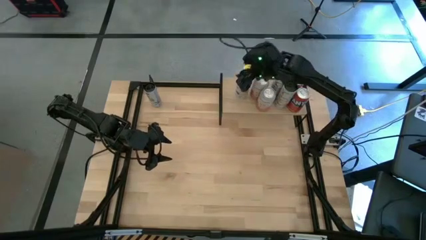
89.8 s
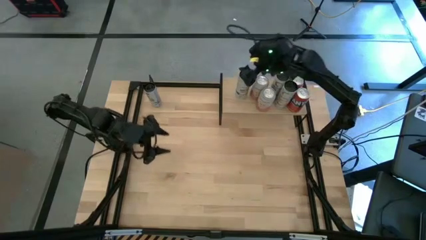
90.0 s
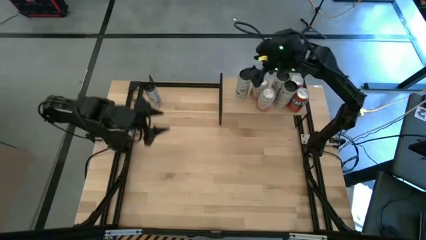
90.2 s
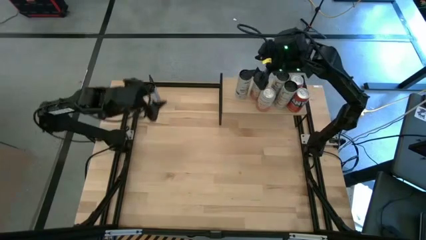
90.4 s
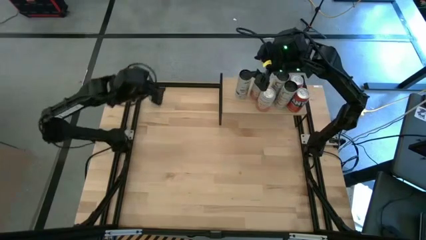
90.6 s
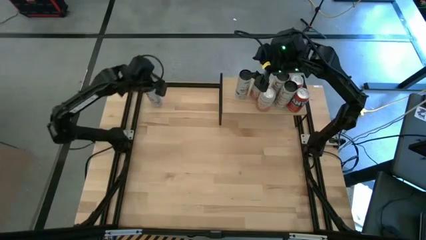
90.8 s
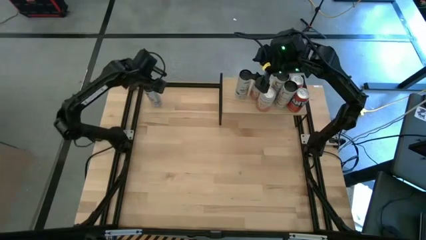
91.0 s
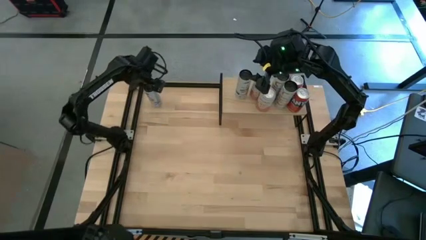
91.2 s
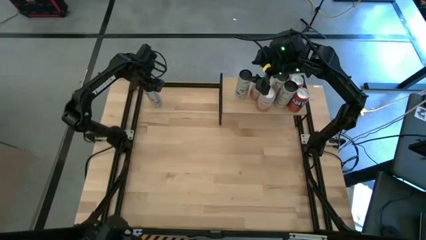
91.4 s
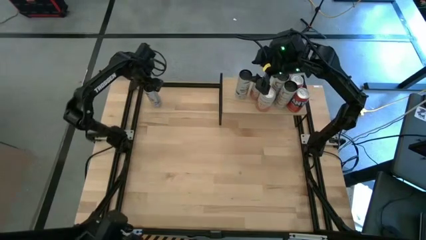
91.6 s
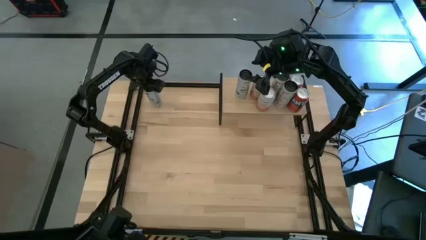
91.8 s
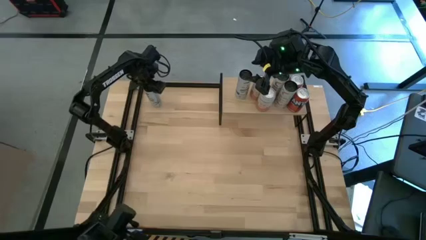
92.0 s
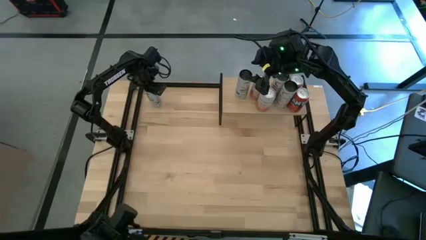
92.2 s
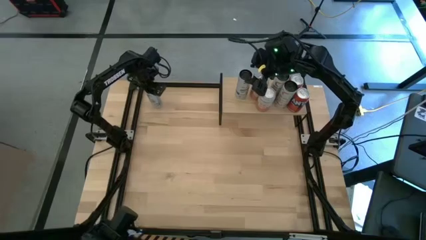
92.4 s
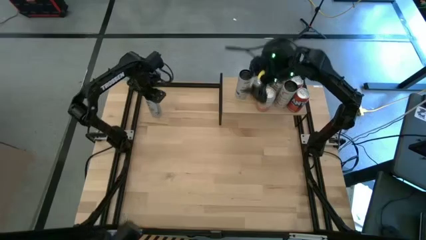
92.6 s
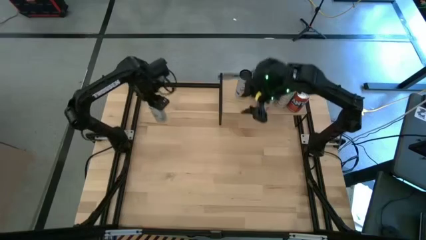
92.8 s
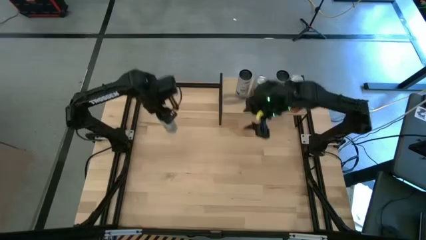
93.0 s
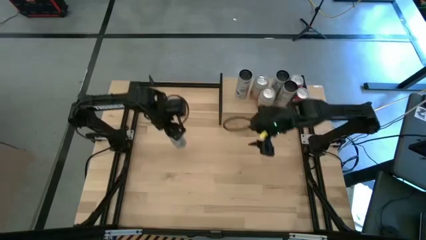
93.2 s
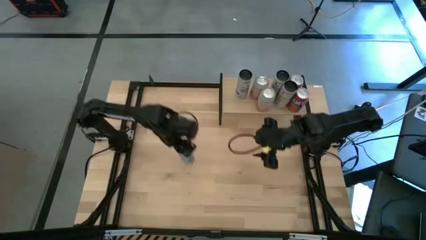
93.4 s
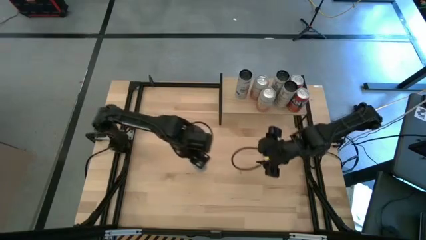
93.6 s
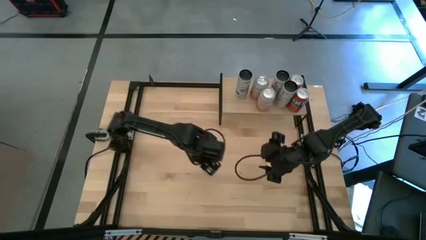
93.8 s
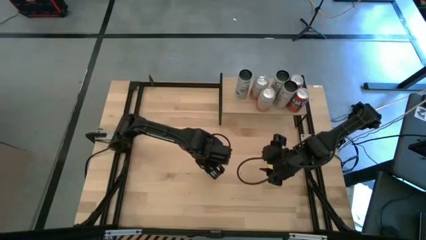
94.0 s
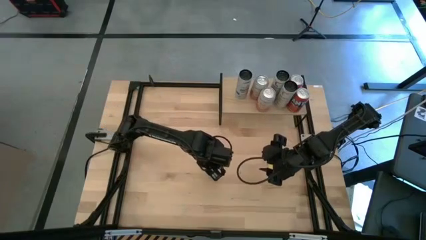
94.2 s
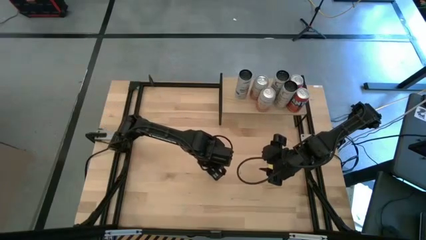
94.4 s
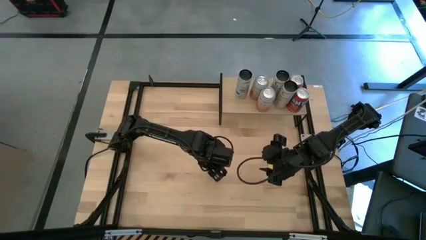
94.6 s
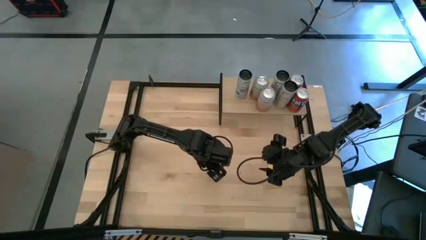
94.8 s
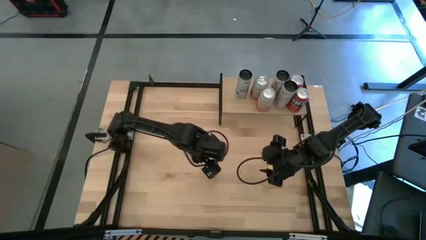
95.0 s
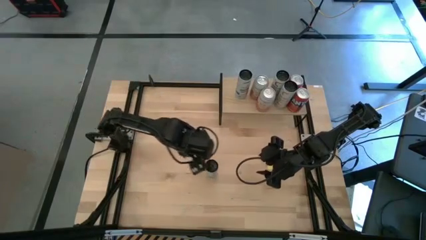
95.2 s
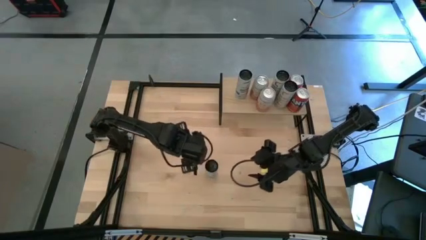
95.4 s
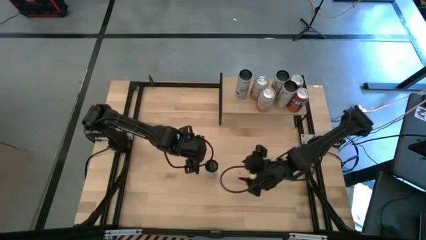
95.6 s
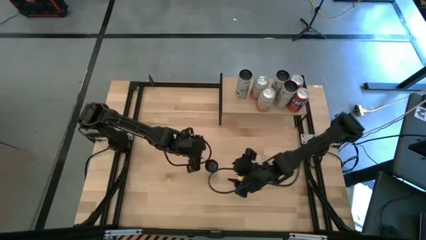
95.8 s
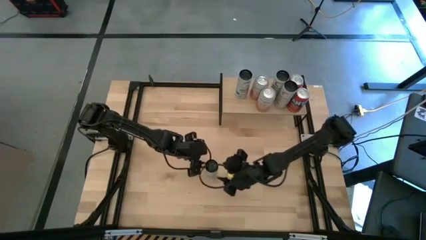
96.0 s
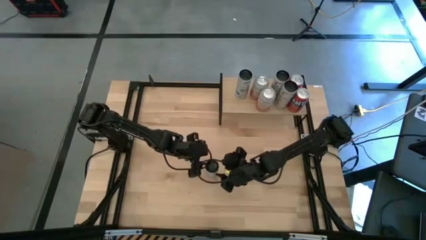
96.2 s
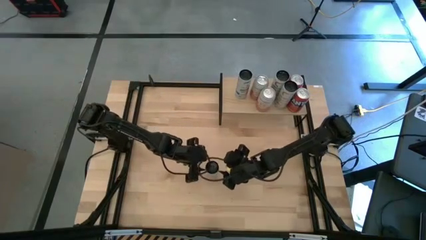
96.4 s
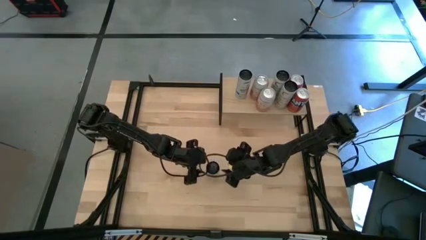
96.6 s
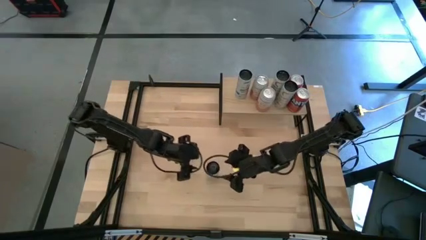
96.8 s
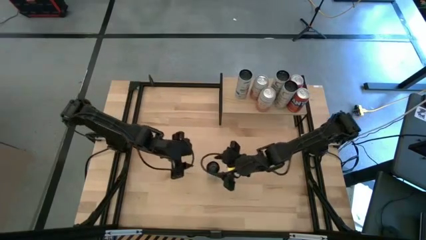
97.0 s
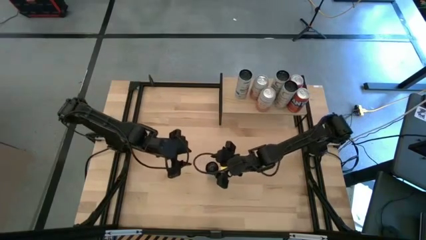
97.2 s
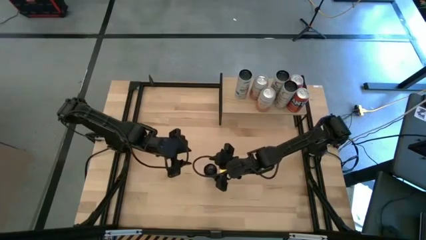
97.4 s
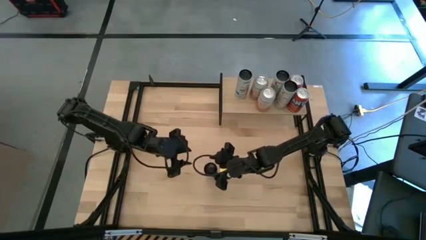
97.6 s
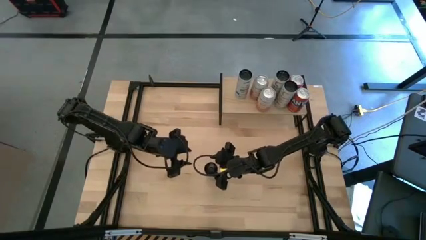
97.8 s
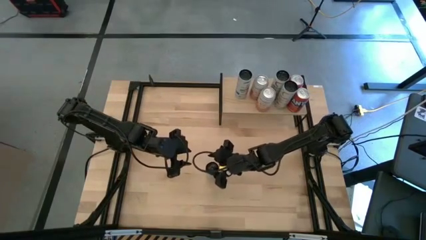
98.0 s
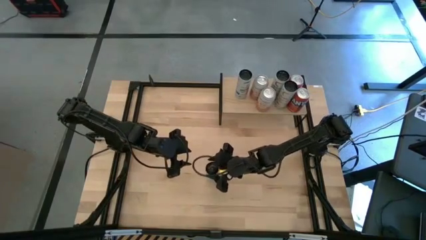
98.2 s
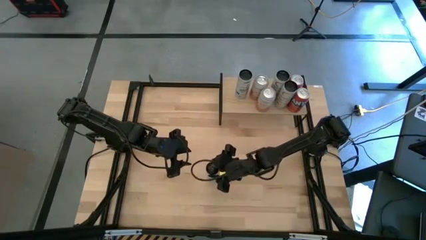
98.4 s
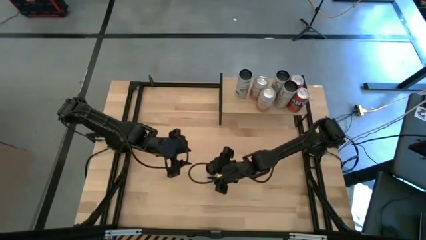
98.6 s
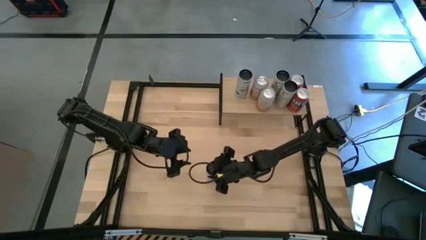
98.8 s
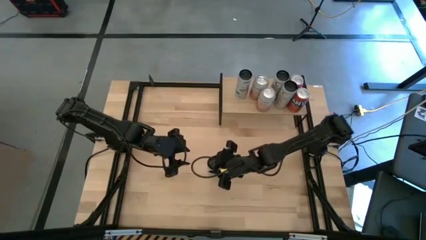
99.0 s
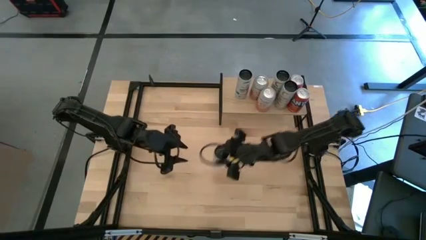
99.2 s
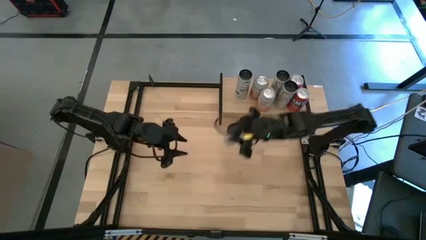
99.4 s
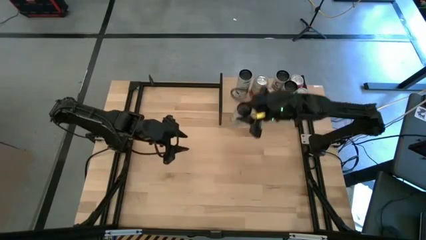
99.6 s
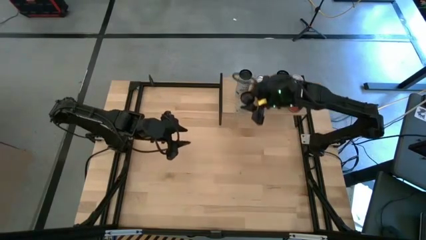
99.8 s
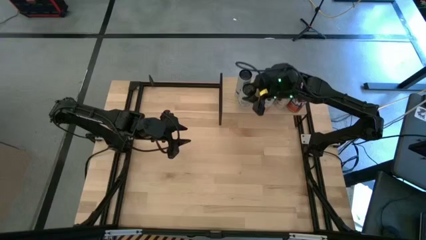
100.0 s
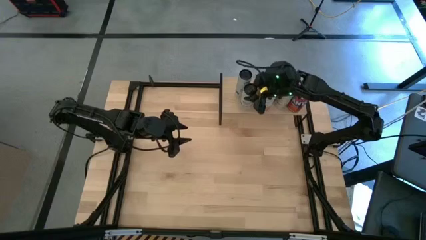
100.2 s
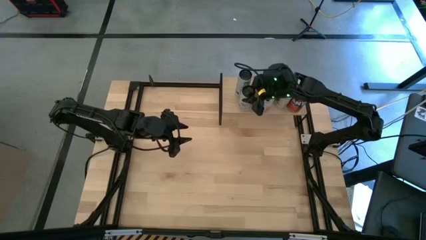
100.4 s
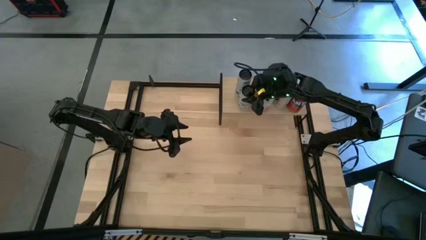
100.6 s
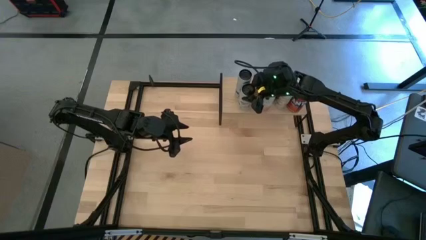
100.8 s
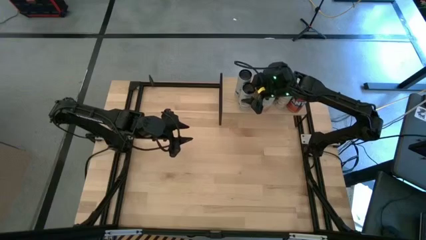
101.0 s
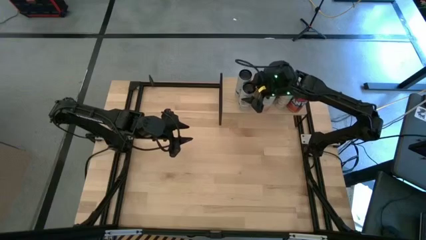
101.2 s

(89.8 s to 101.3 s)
Task: Place canned beverage on shelf
Put the white blue soda can on the shelf aligned with the other white blue soda can

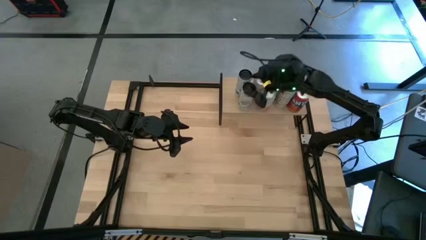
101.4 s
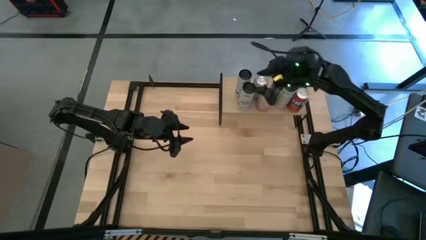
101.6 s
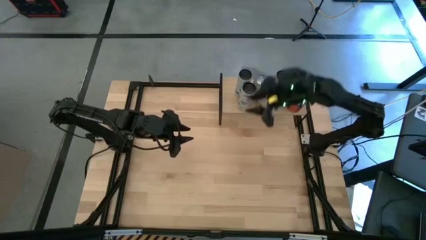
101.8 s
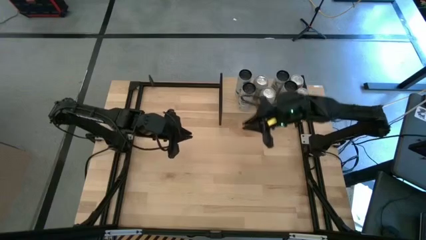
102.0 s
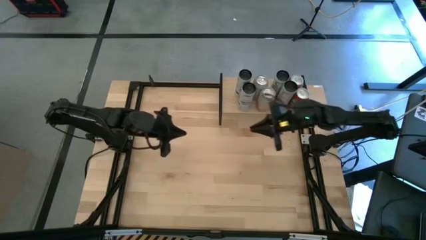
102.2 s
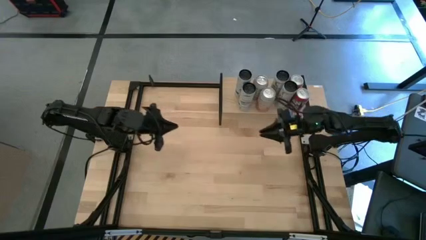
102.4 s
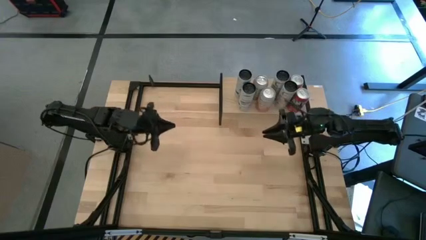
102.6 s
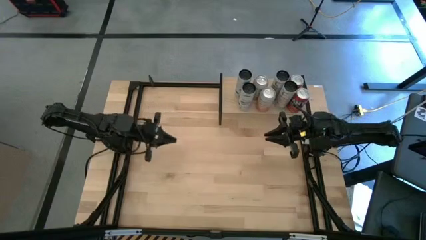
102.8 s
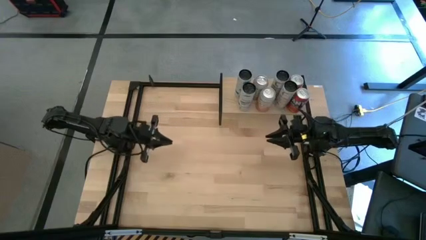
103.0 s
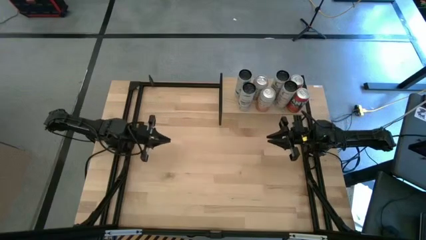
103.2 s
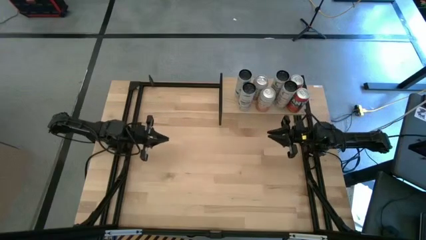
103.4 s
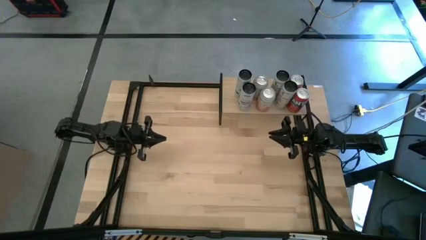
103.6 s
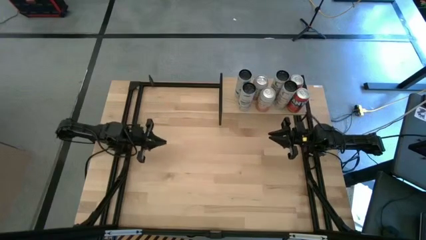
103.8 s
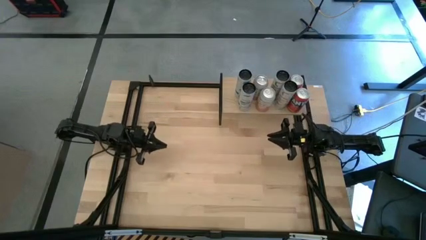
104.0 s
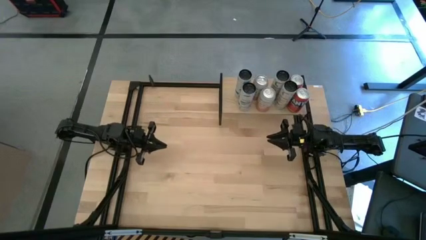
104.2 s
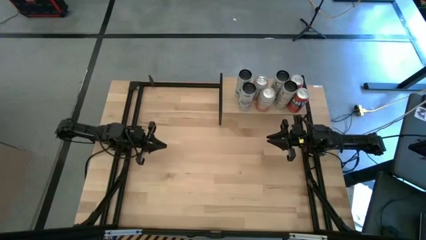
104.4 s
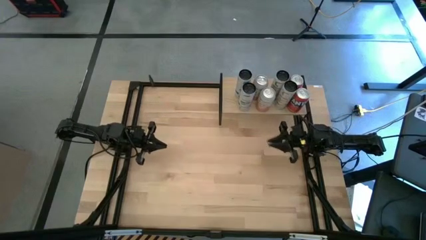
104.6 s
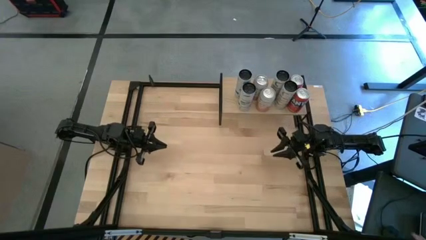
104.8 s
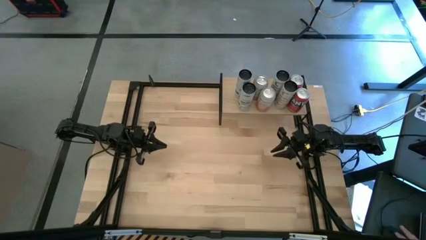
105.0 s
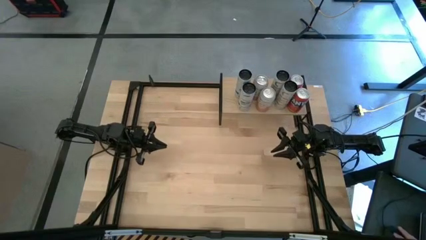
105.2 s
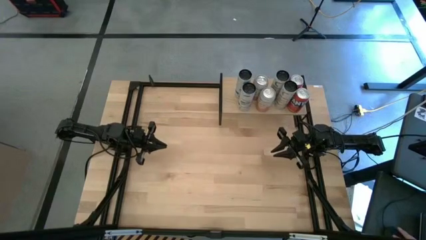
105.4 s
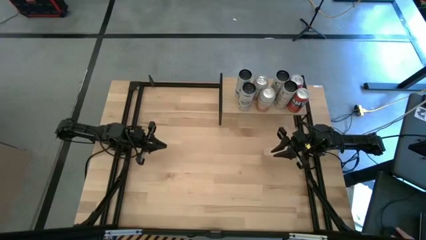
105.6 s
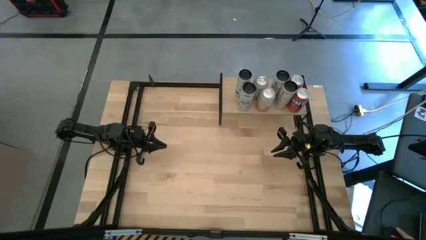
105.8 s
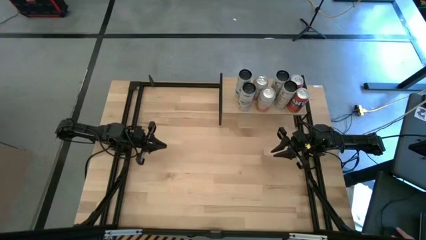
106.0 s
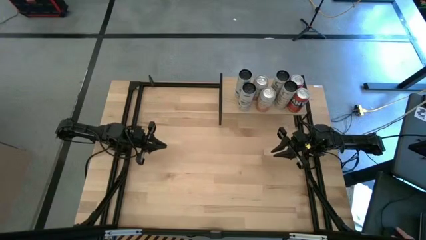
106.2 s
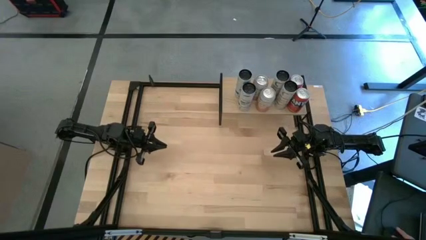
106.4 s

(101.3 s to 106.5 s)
Return to Home Position
